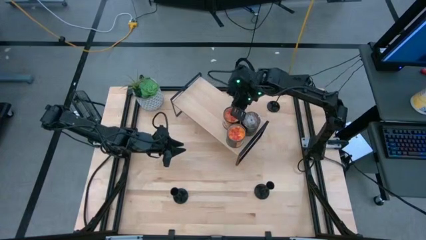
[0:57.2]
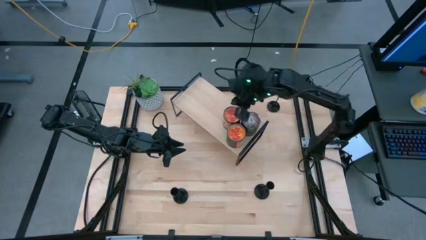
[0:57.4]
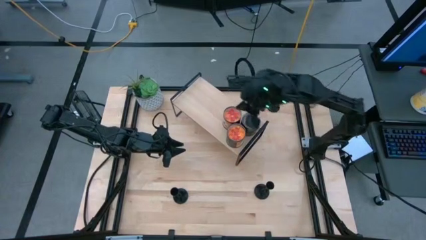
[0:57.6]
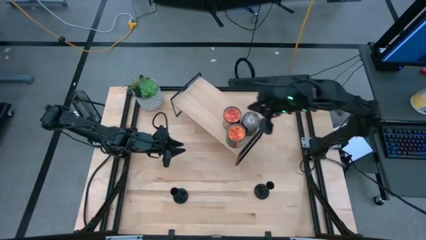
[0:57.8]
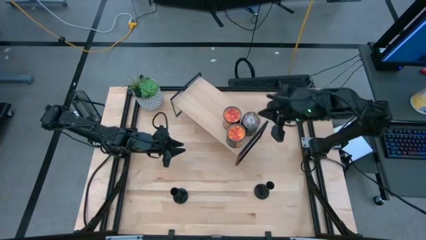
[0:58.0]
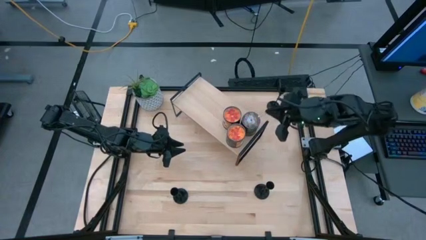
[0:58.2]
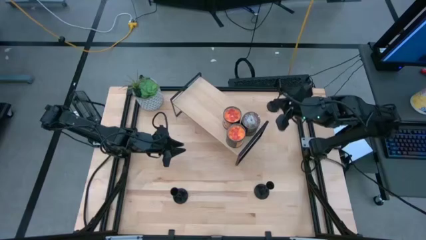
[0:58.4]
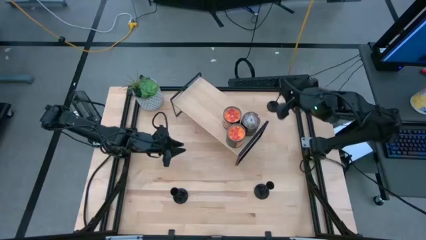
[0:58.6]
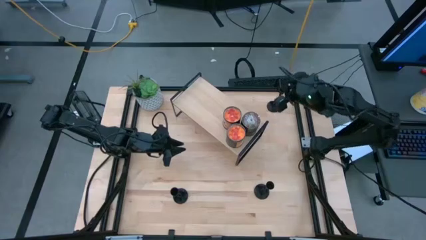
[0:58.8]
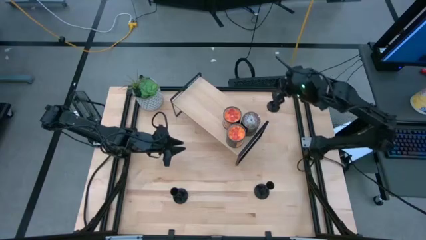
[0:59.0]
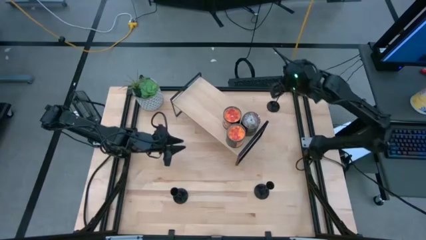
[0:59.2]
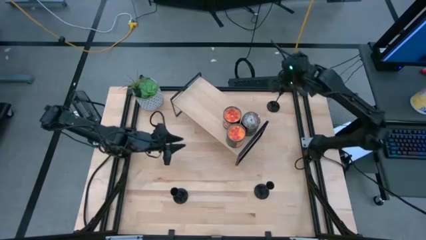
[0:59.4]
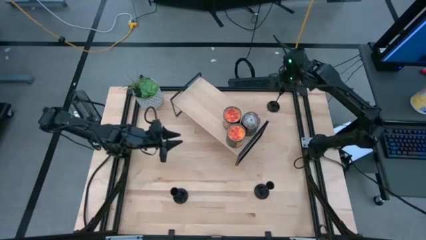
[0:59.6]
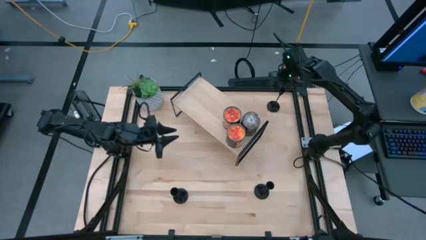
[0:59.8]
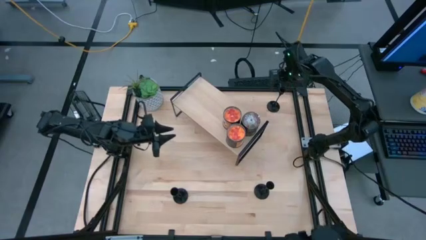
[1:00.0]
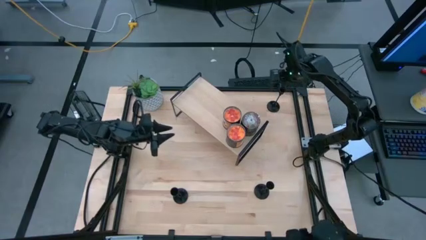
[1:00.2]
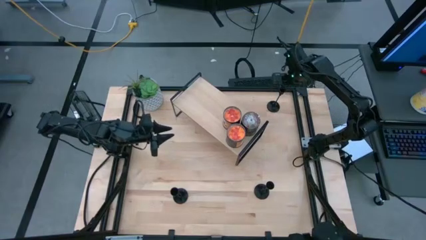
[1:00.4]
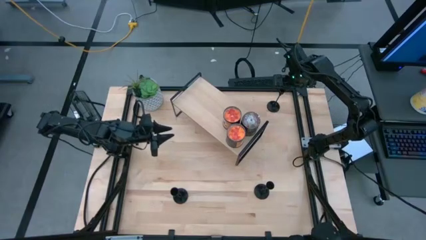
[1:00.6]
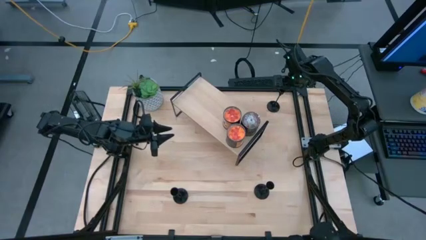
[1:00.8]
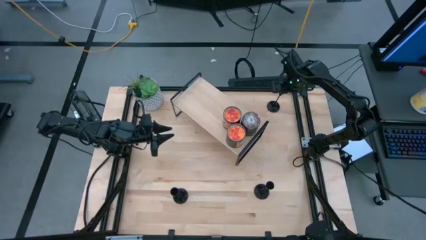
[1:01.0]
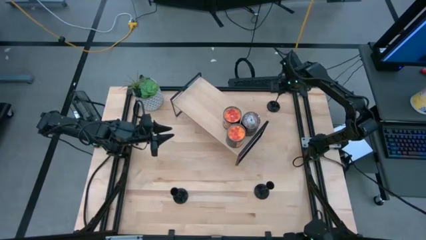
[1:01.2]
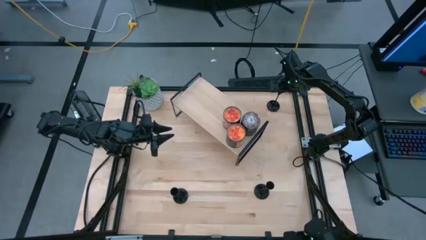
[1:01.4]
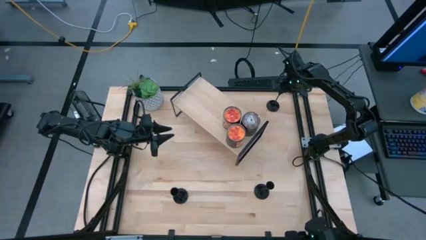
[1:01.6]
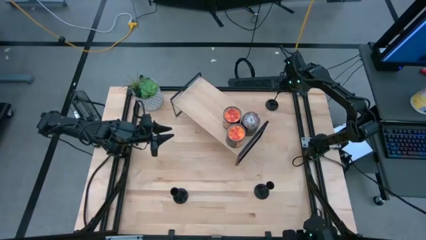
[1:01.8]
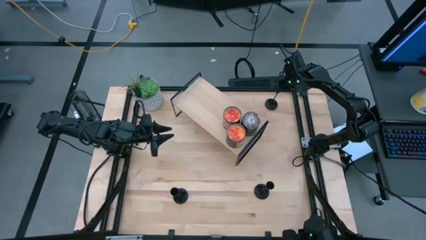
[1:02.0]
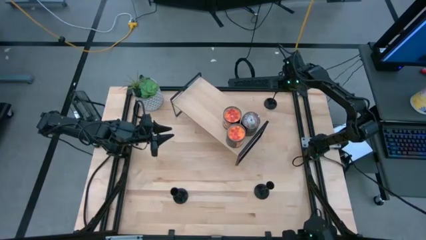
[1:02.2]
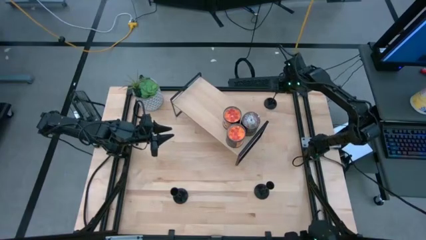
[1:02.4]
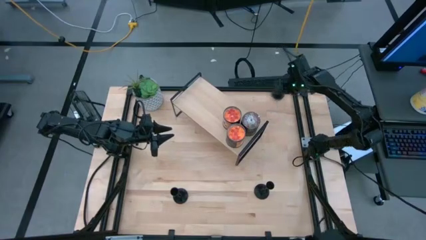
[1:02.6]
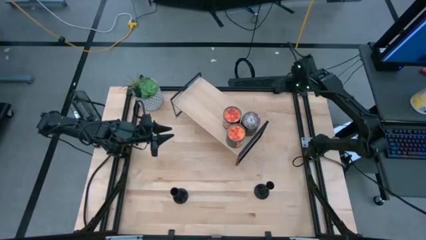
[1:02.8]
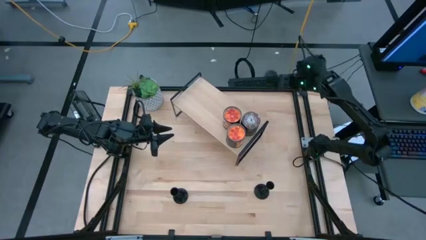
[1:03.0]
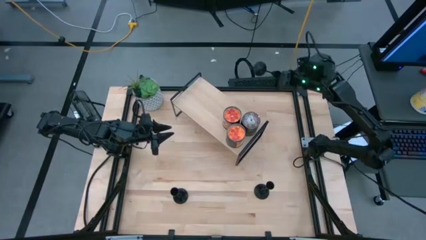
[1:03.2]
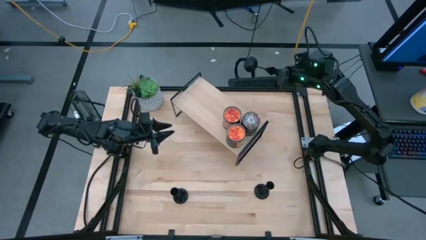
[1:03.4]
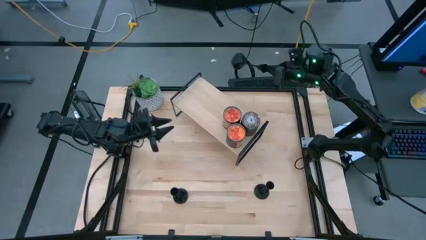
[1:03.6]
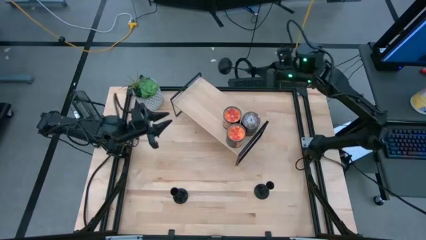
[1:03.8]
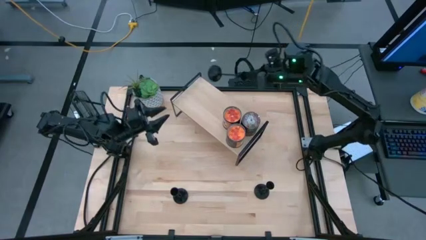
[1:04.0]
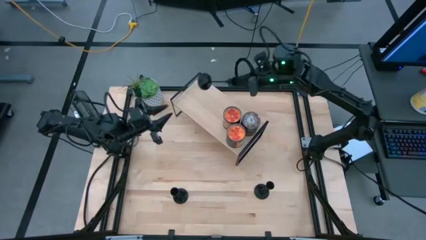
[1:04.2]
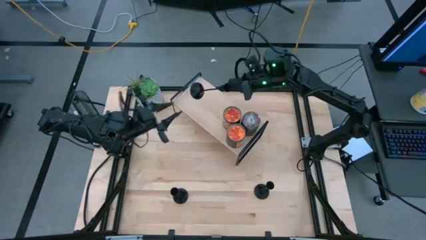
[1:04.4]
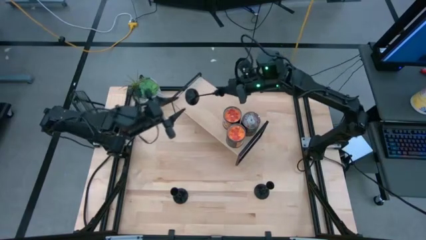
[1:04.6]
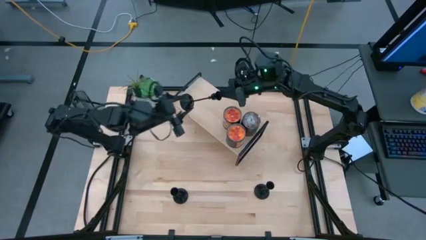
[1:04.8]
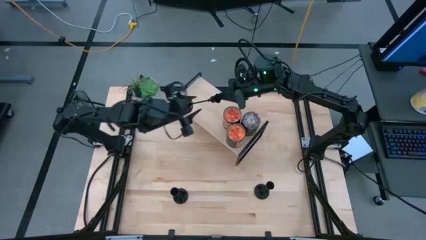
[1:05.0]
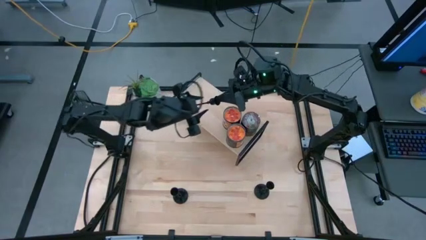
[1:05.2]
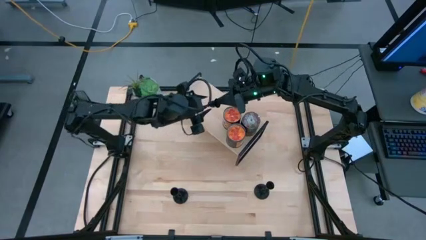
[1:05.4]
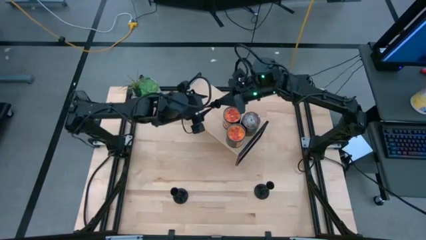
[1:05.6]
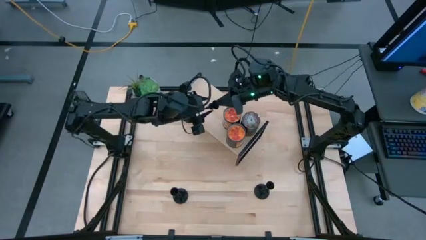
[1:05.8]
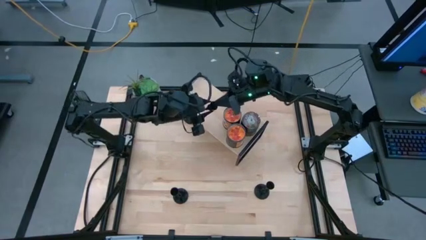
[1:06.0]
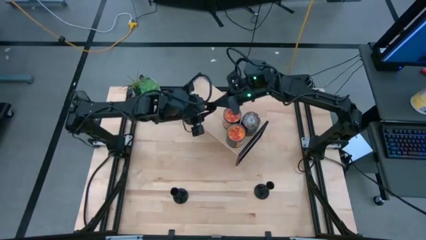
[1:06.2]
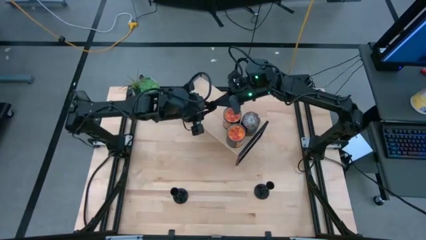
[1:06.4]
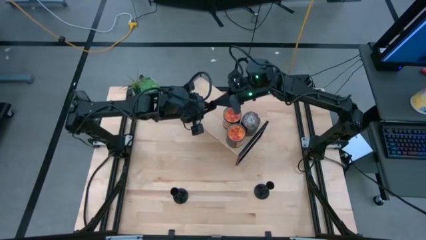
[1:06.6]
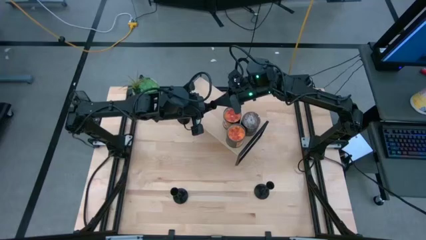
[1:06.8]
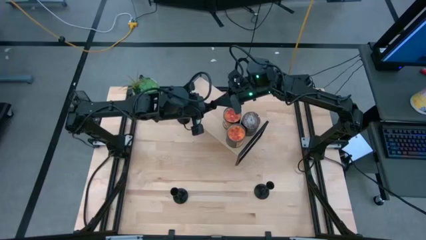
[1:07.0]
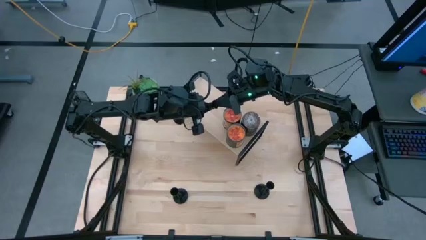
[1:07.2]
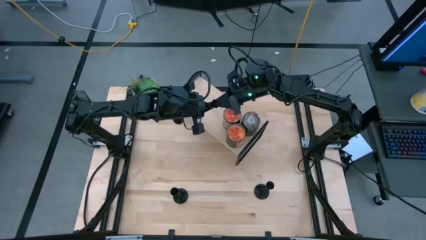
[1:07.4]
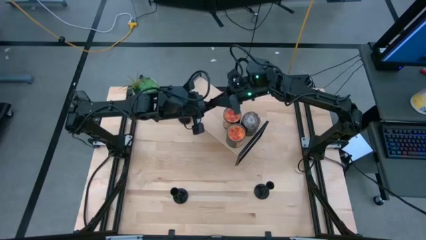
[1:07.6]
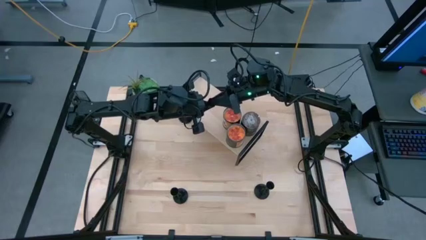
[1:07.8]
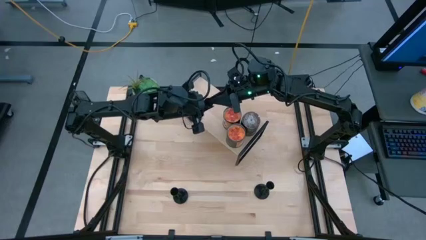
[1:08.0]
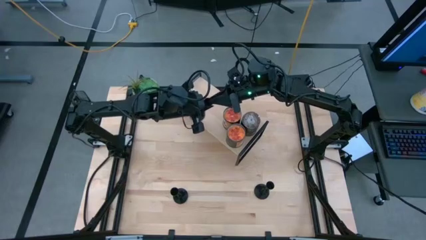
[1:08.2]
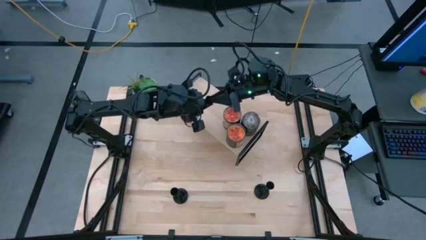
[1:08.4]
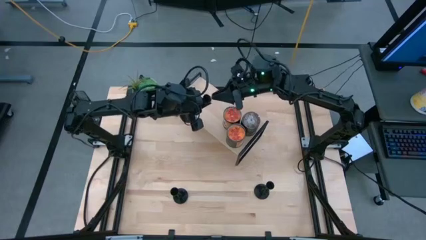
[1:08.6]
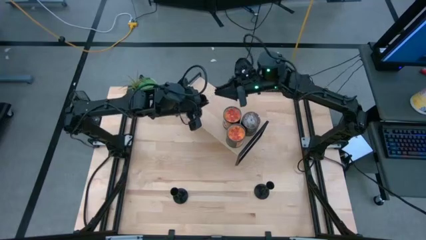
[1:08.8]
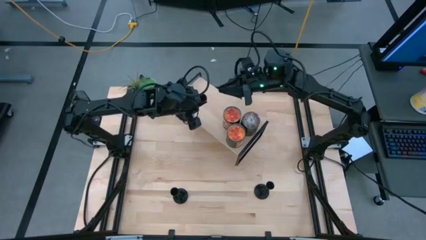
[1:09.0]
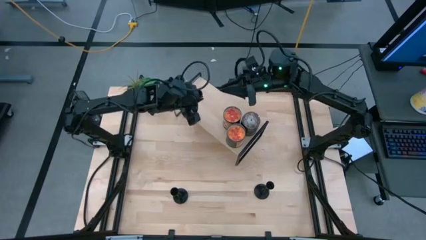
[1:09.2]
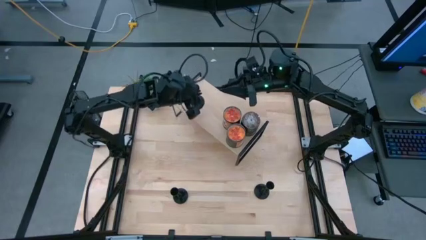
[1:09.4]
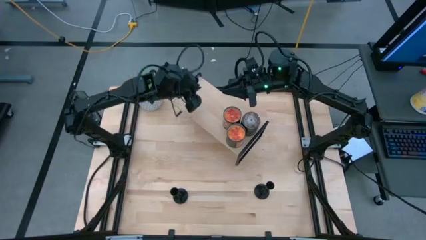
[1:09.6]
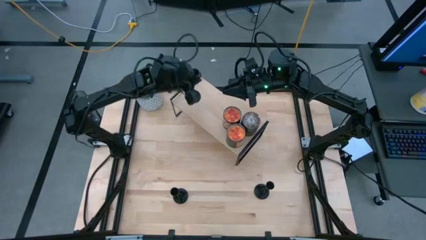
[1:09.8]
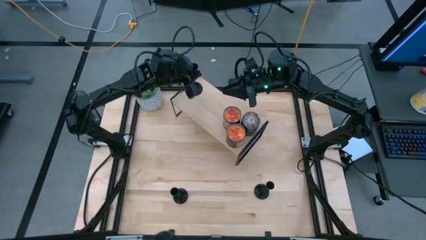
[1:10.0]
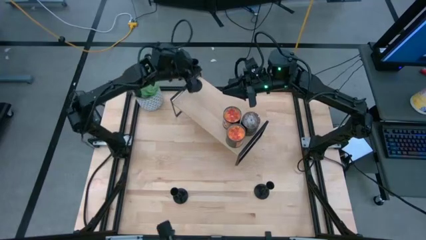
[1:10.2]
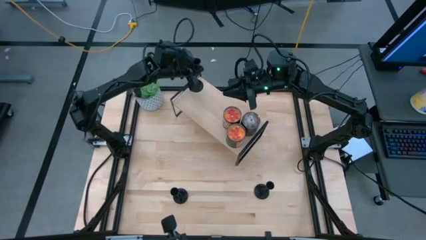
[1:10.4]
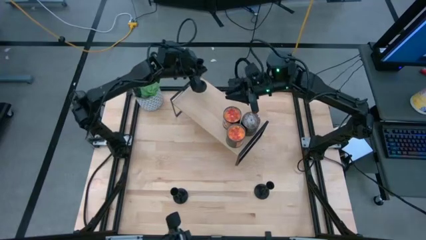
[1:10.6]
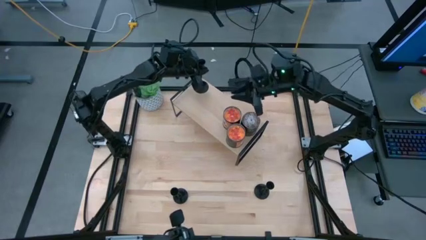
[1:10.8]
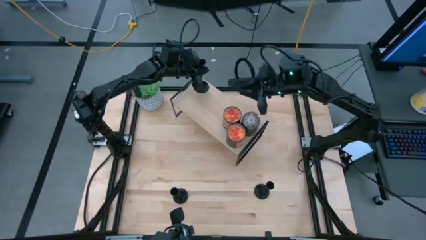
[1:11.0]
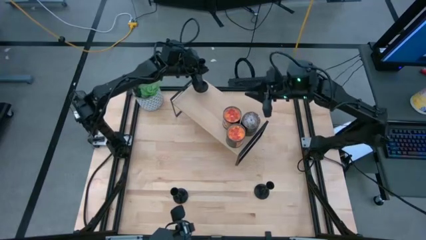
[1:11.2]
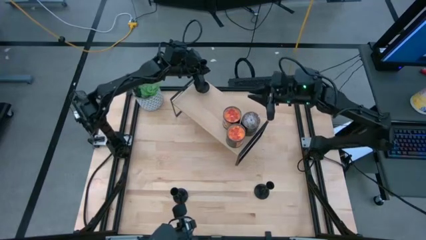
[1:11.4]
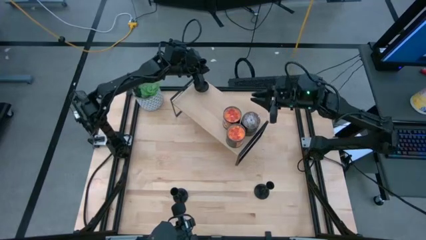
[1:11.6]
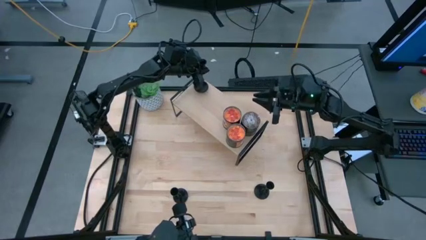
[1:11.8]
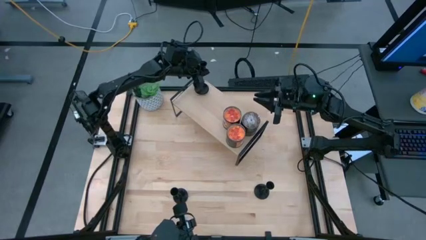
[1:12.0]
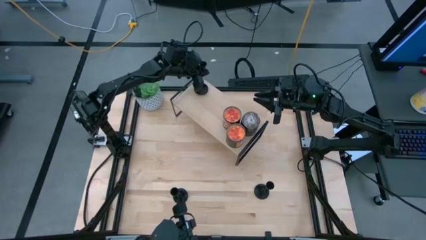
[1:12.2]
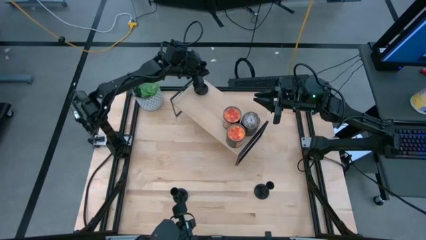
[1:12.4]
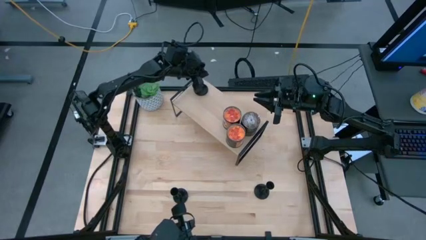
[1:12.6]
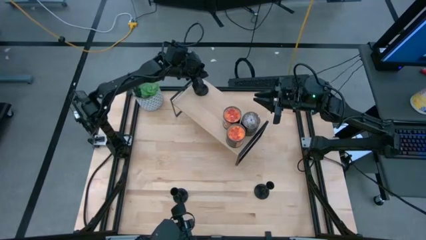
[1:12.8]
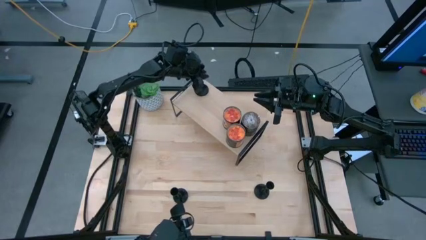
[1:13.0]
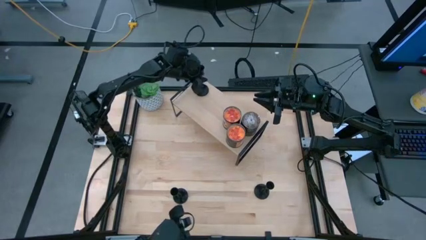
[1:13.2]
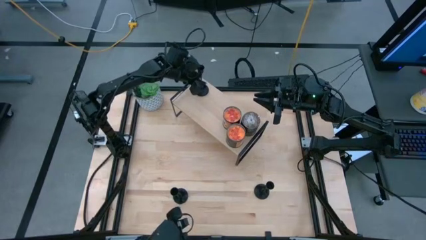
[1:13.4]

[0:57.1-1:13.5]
Task: Pick & Place candle stick holders
Put the top black candle holder on the shelf
